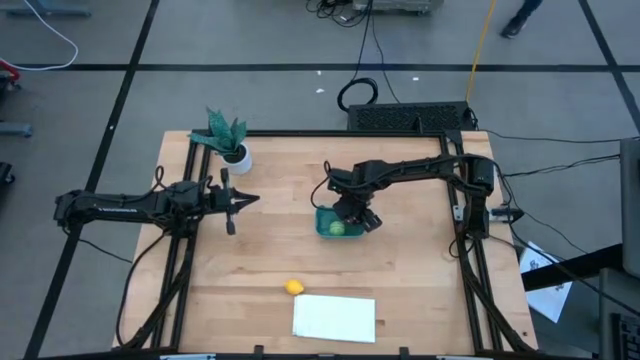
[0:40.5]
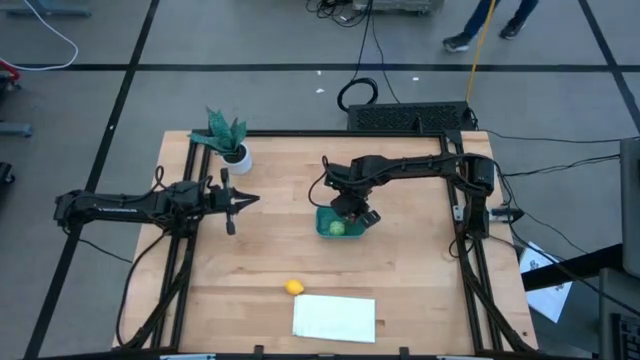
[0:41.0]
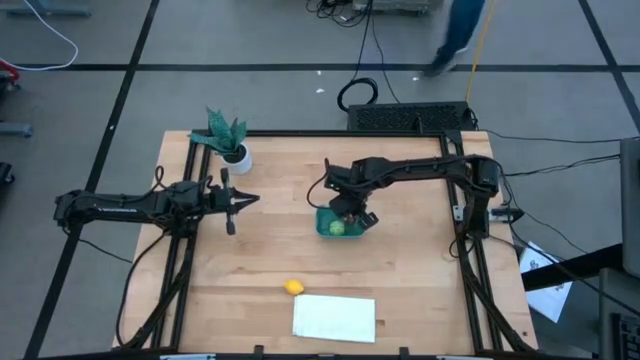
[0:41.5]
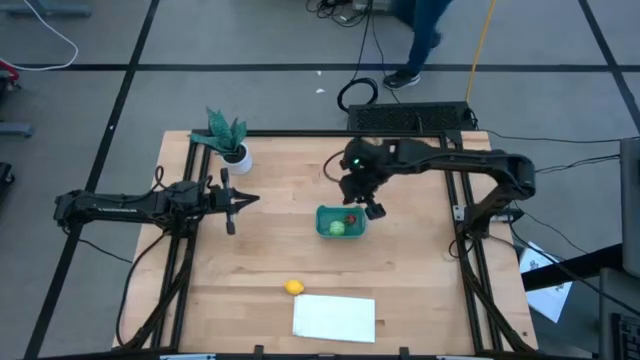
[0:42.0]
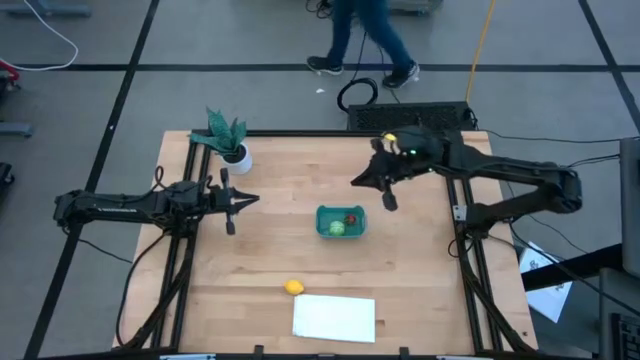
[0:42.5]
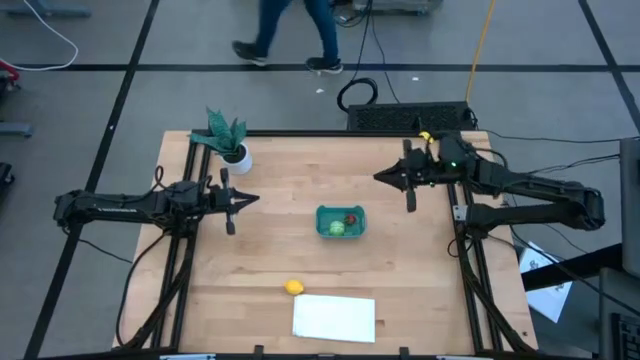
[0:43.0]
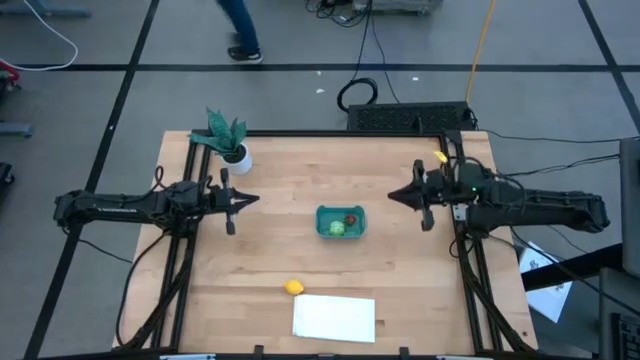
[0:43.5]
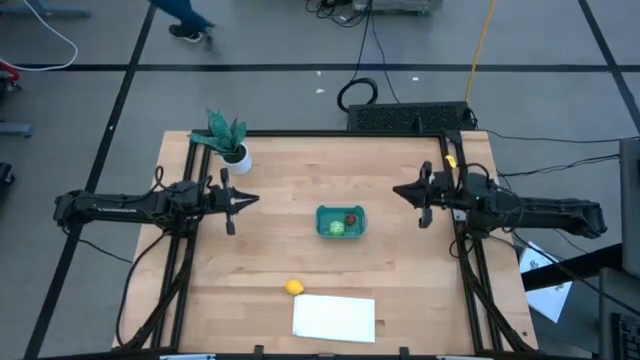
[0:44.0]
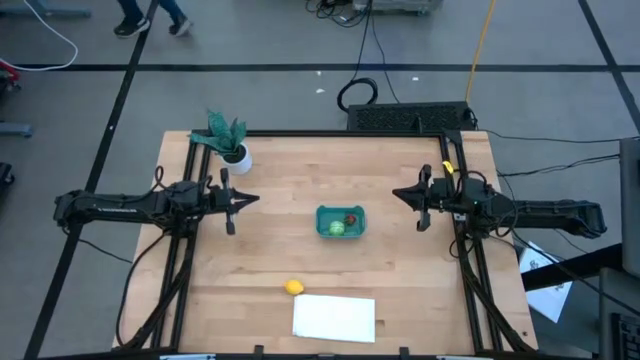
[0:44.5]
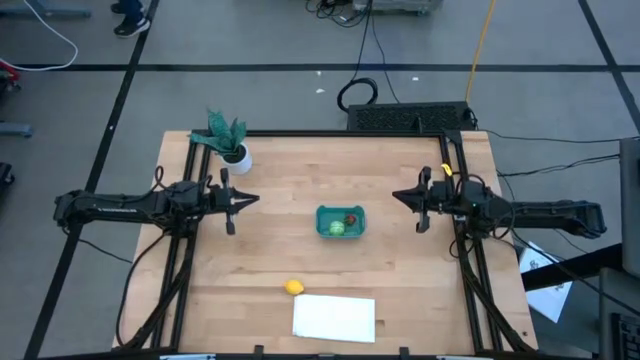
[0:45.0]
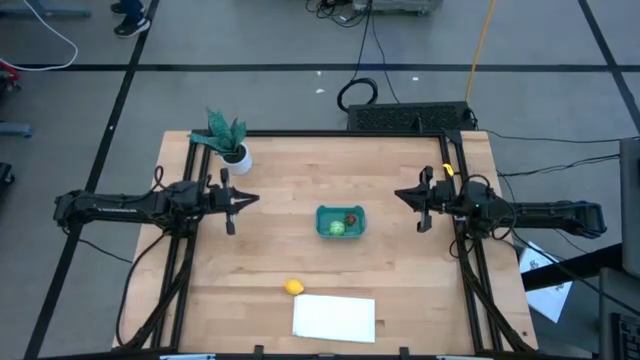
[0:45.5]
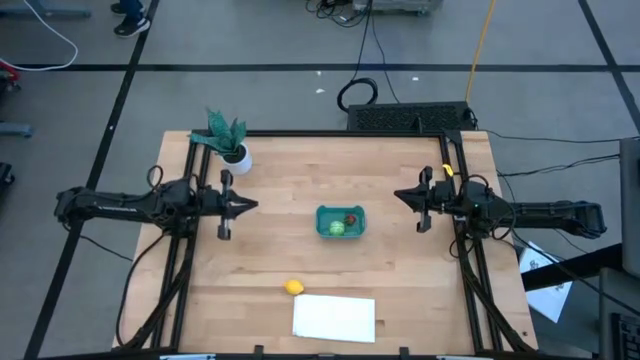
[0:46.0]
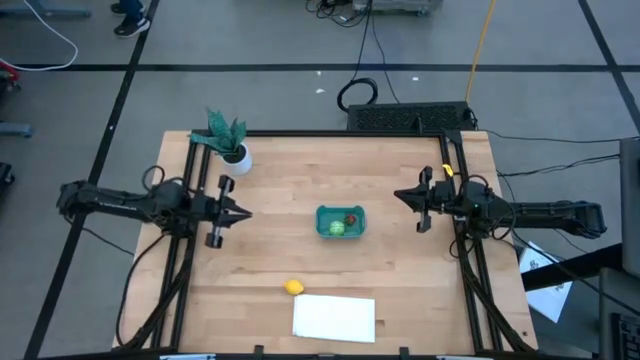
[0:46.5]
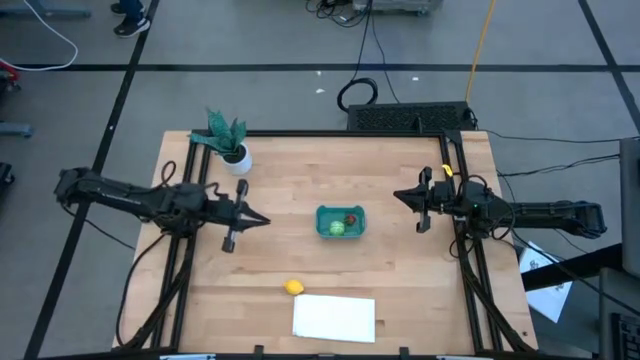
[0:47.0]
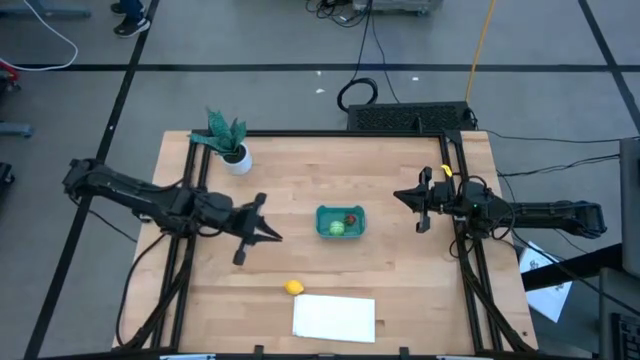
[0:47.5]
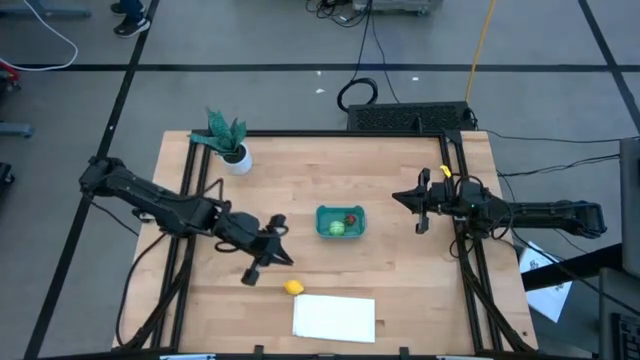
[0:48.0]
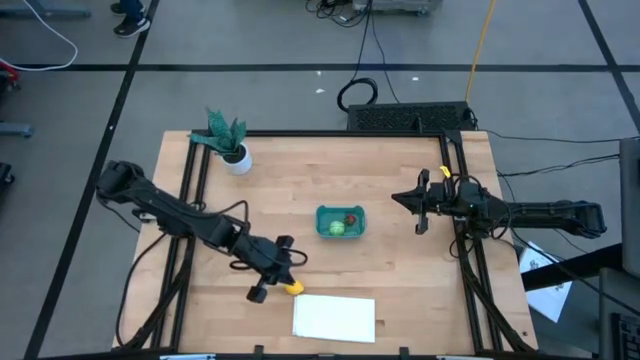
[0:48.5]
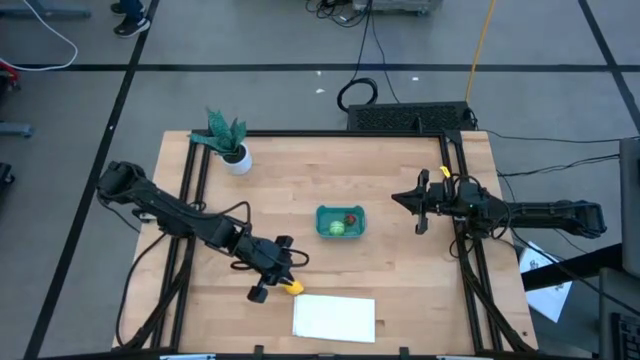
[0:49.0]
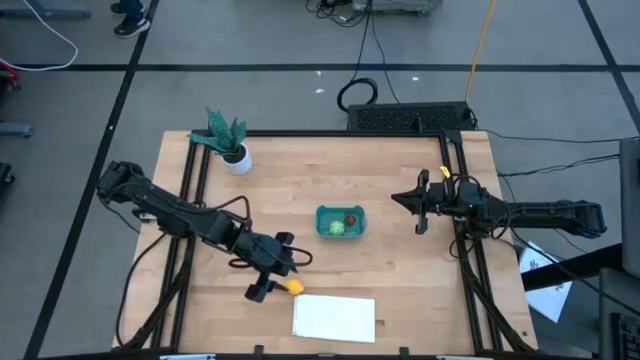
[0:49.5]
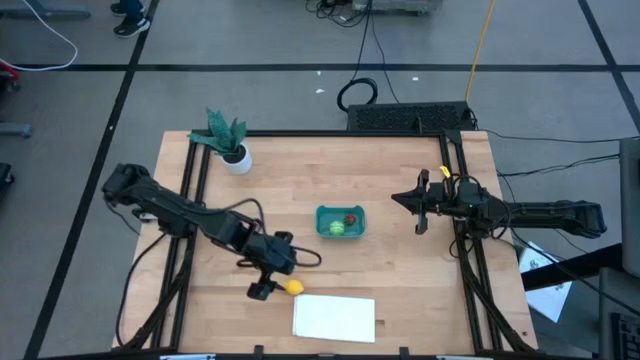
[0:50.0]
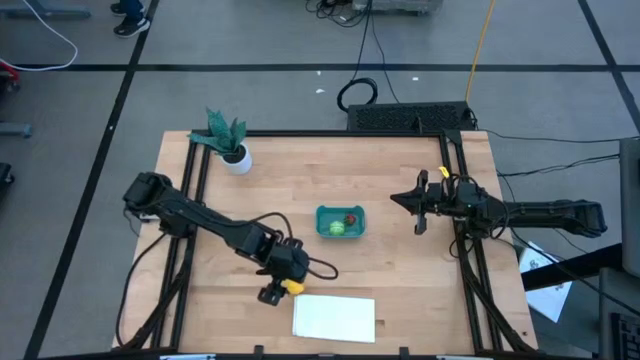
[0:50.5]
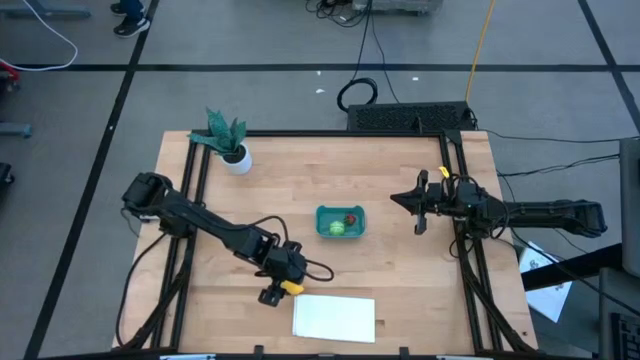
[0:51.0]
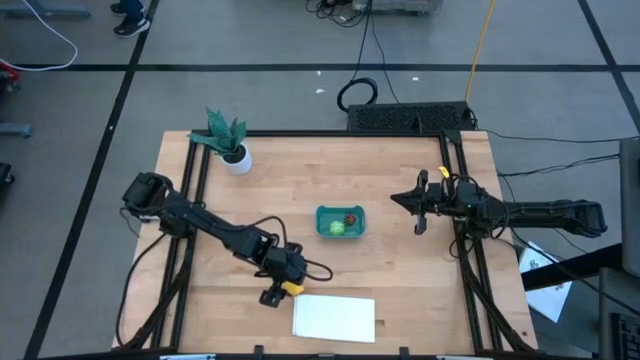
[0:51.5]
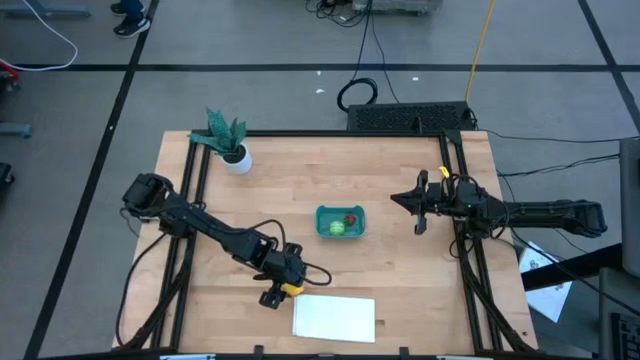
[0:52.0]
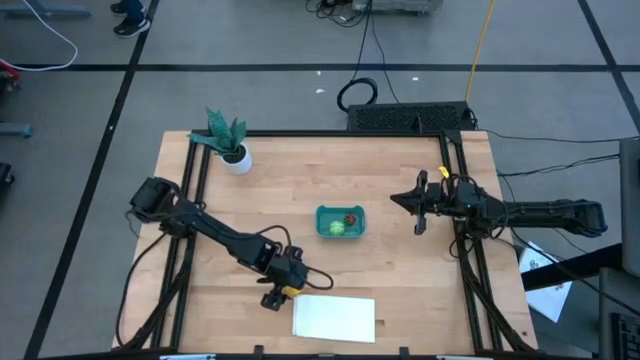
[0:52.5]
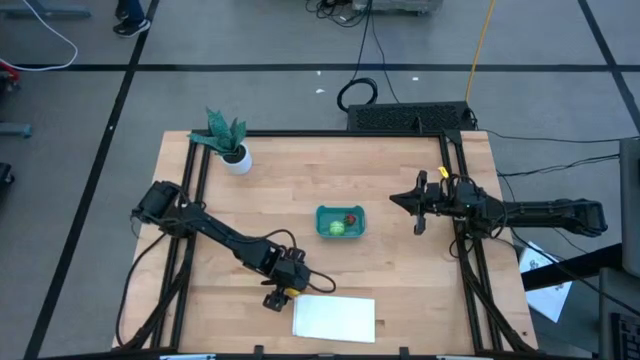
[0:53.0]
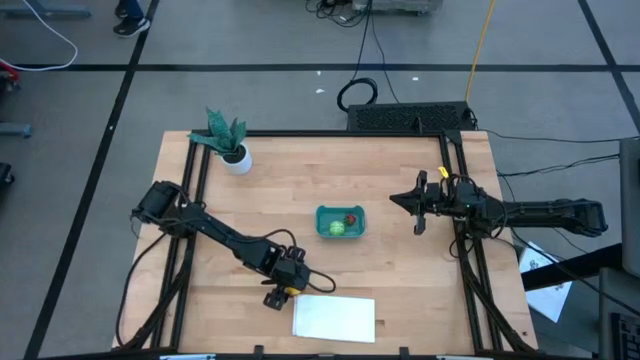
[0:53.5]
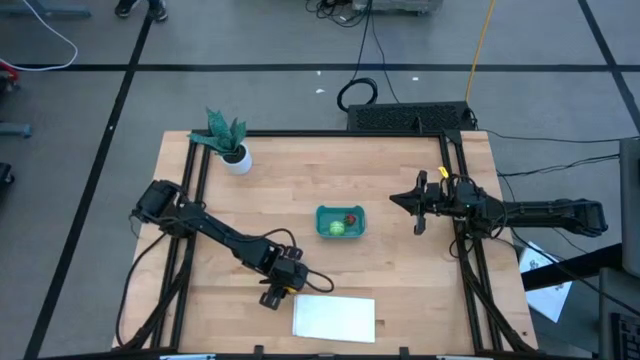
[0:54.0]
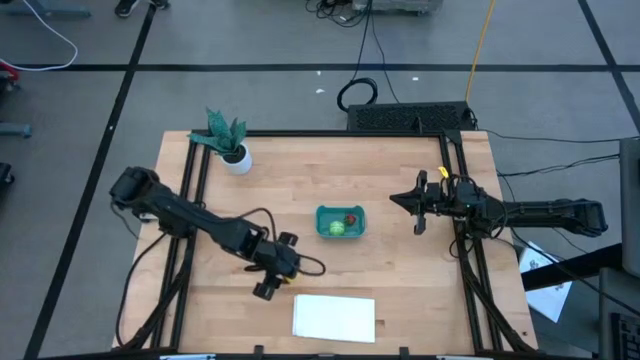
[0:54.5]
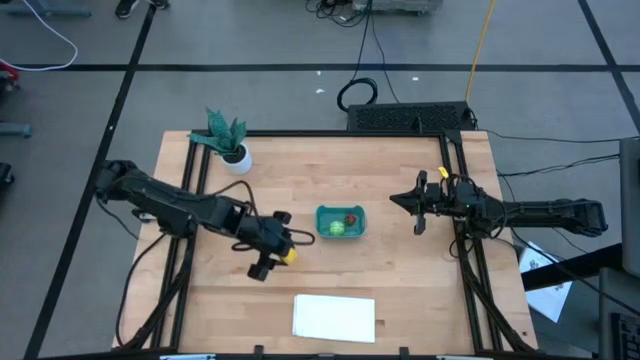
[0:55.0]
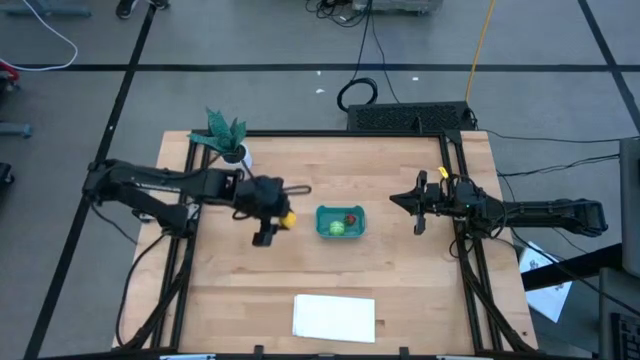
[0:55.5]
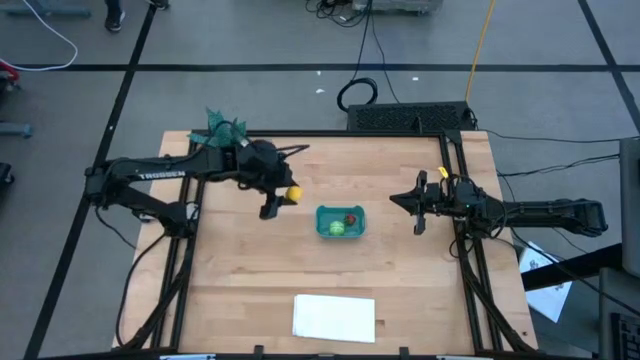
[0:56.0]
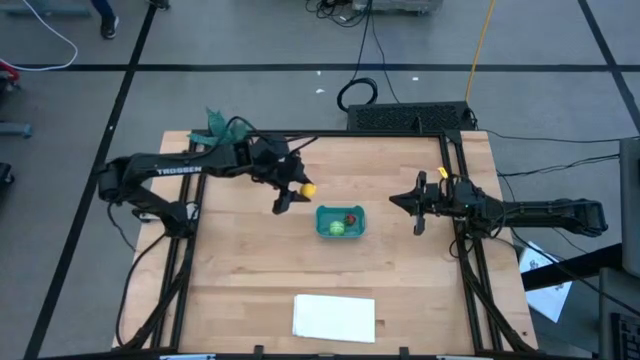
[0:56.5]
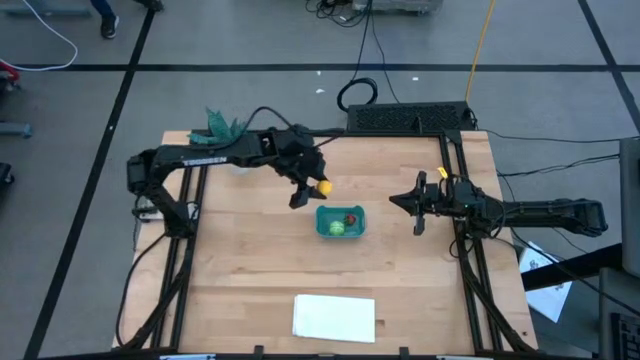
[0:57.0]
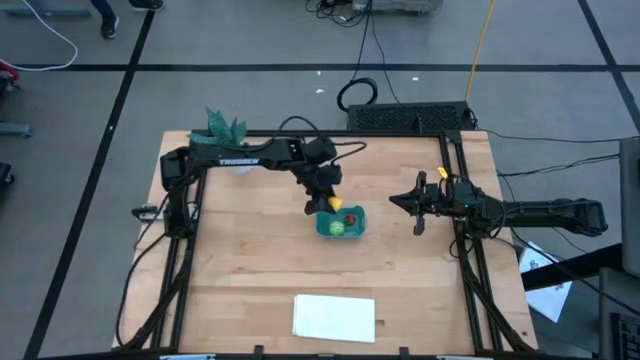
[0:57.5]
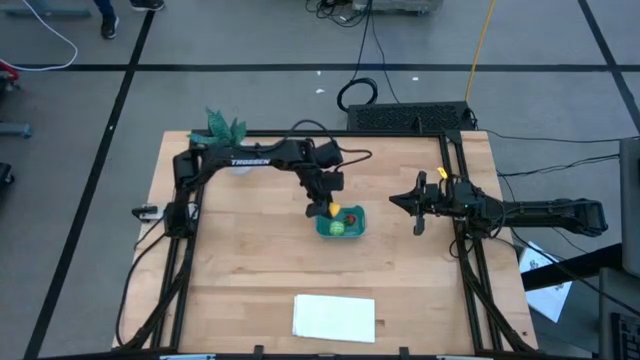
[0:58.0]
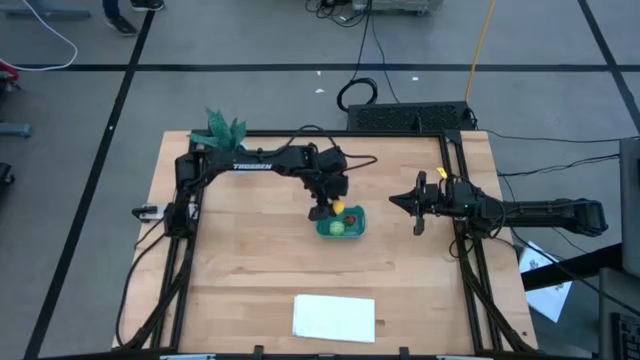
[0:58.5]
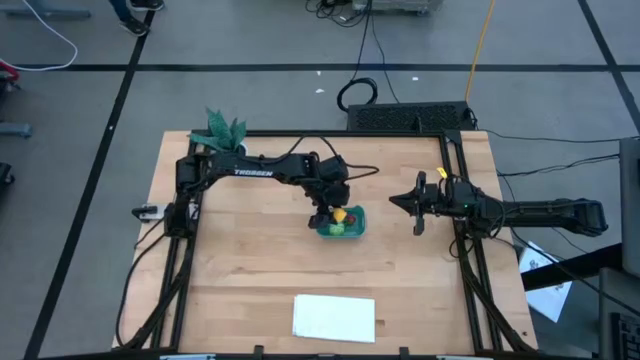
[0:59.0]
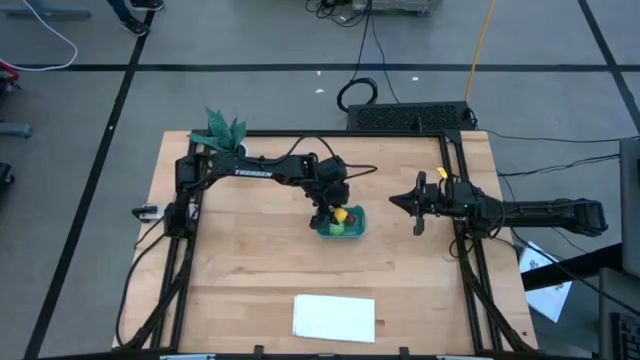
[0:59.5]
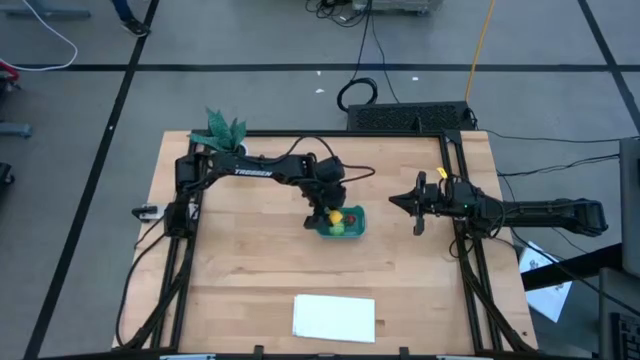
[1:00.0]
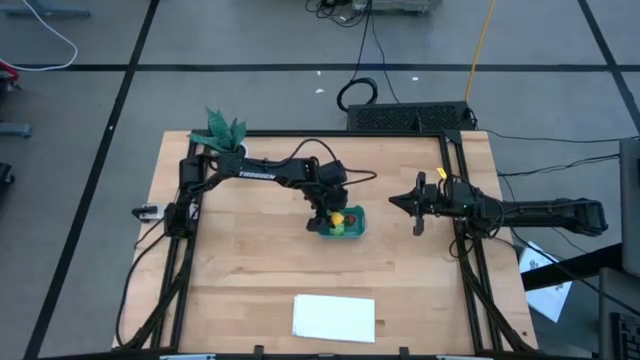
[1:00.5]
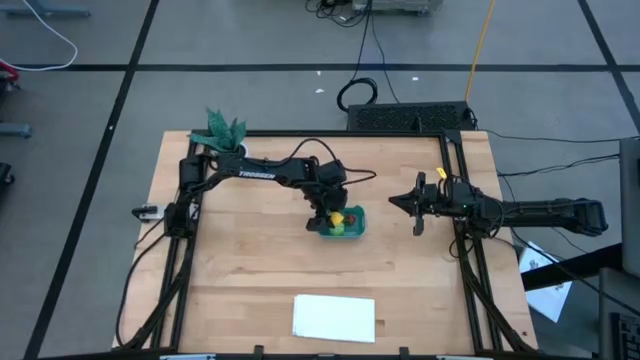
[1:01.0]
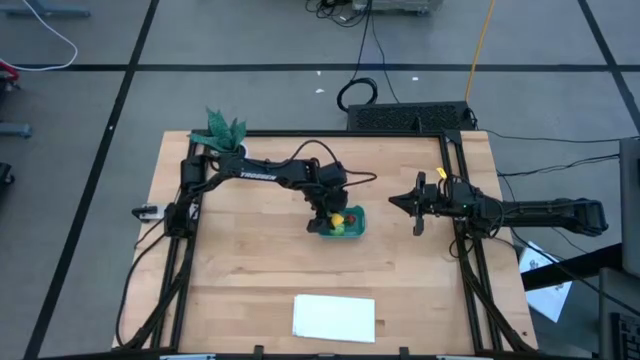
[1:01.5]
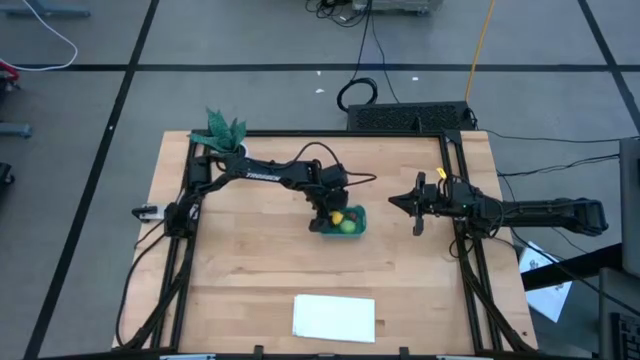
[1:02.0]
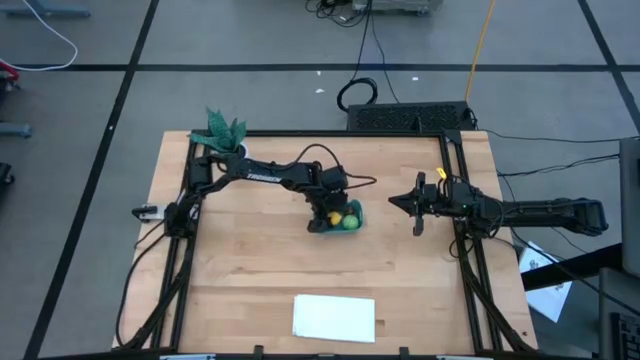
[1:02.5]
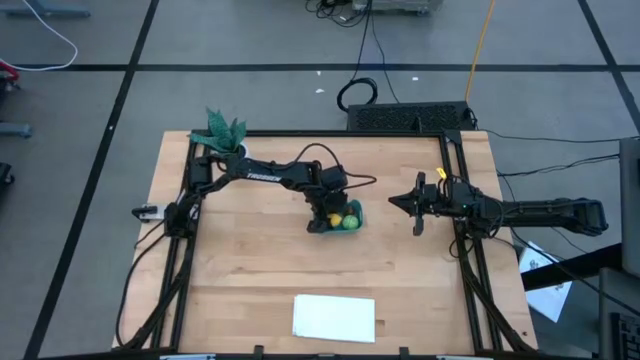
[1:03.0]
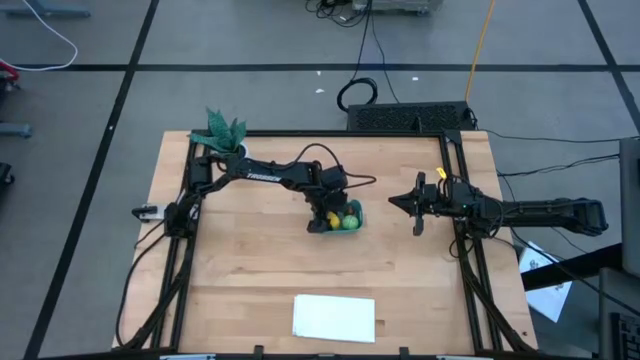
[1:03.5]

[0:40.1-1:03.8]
Task: Pick and placing Produce into tupperware
Put the yellow lemon into the blue bin
